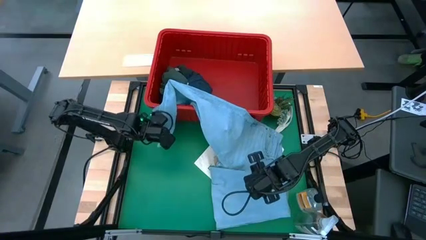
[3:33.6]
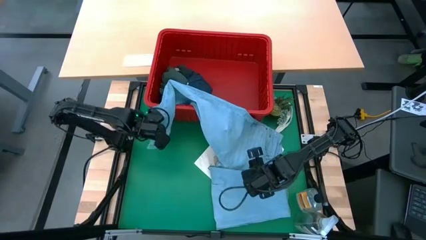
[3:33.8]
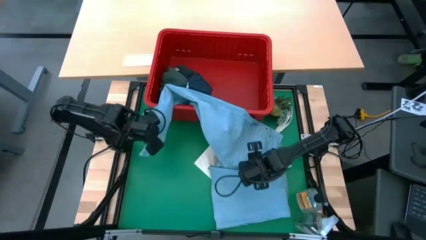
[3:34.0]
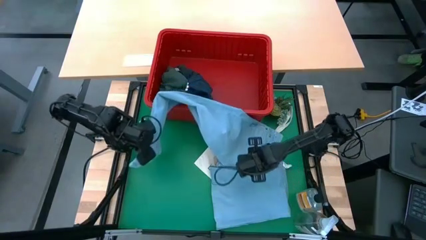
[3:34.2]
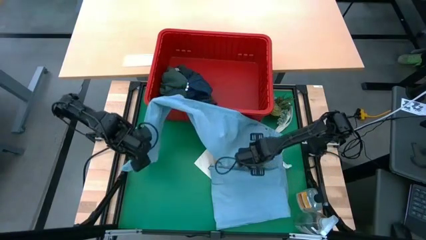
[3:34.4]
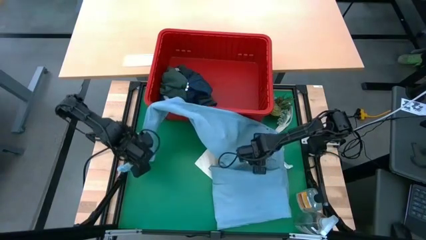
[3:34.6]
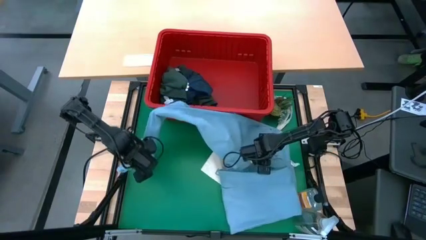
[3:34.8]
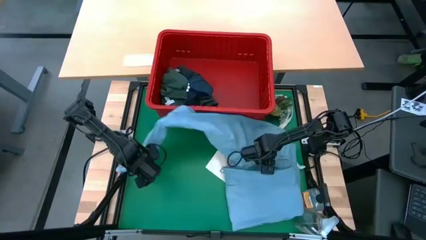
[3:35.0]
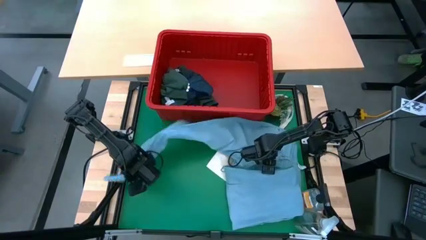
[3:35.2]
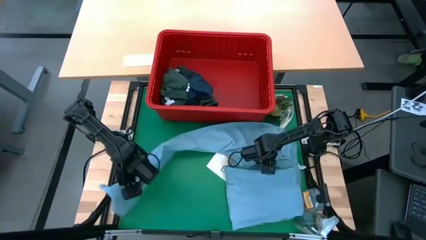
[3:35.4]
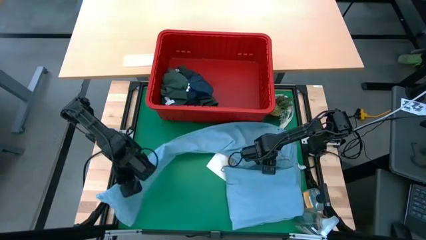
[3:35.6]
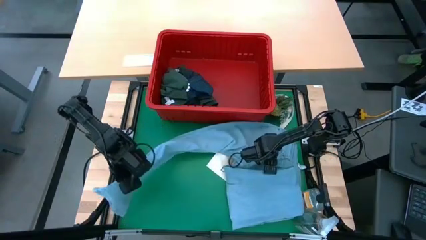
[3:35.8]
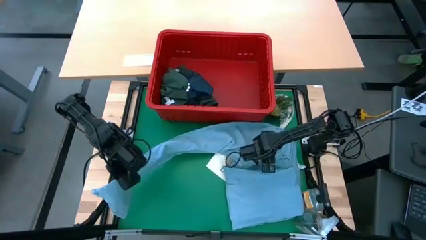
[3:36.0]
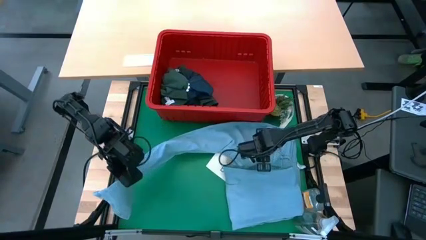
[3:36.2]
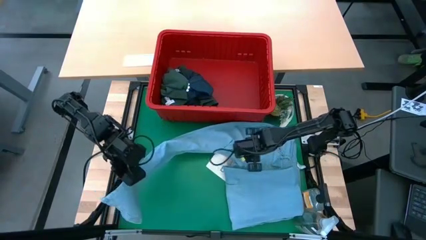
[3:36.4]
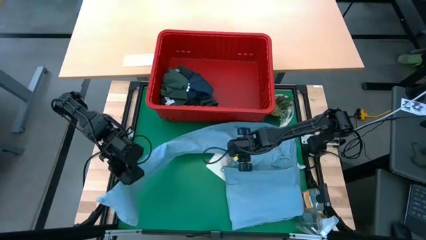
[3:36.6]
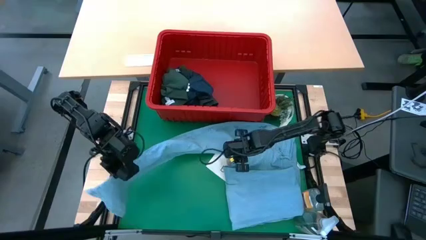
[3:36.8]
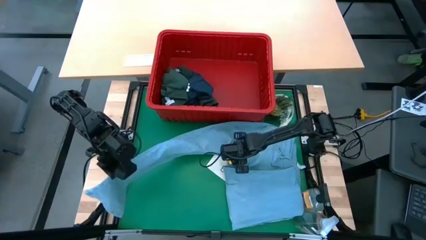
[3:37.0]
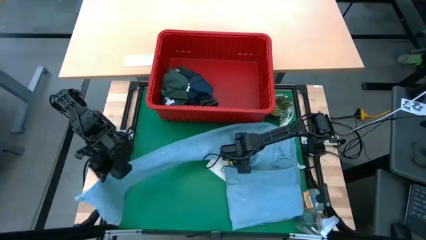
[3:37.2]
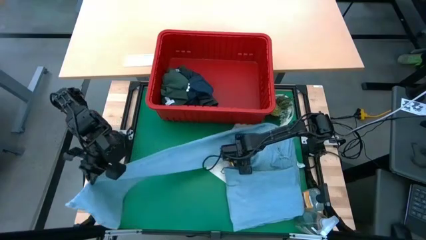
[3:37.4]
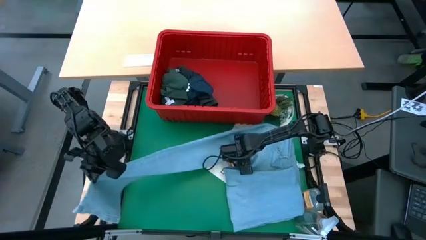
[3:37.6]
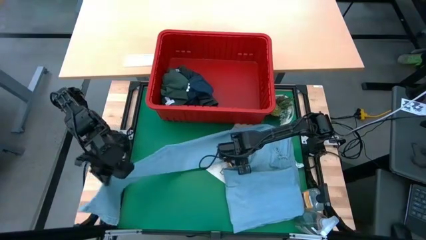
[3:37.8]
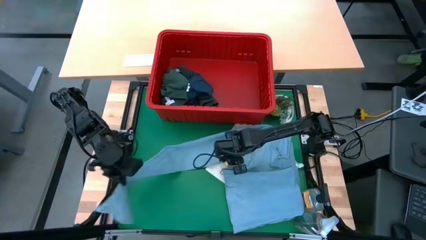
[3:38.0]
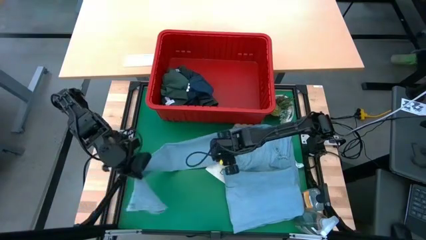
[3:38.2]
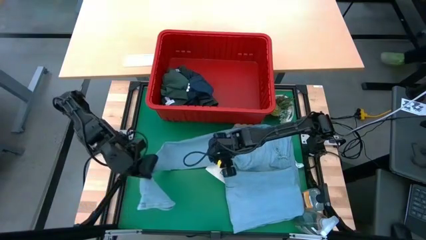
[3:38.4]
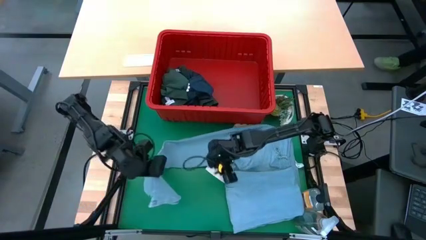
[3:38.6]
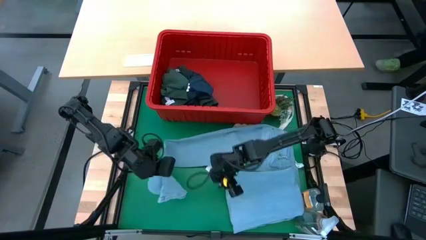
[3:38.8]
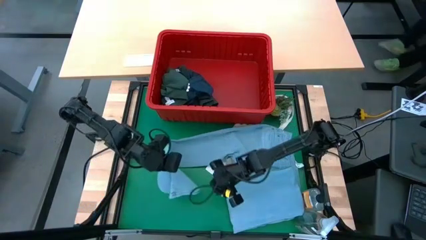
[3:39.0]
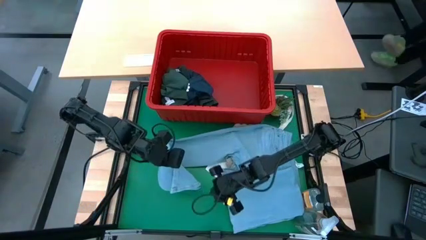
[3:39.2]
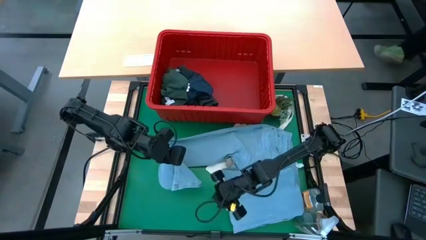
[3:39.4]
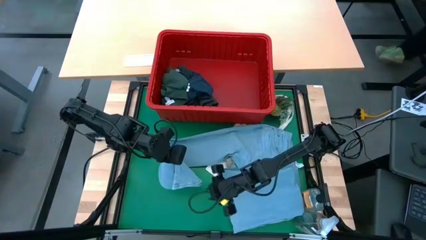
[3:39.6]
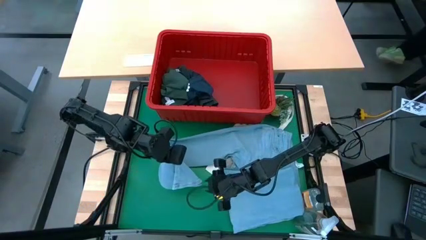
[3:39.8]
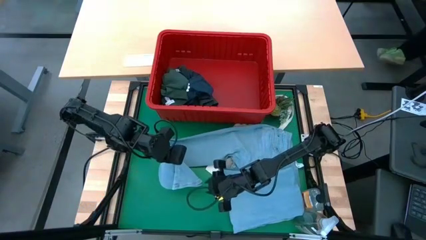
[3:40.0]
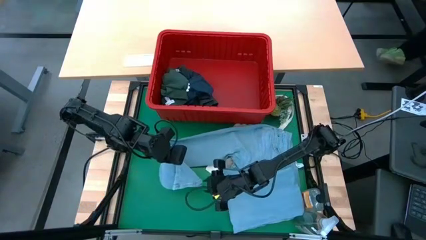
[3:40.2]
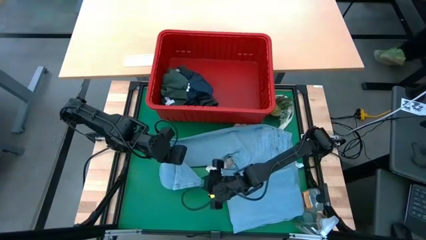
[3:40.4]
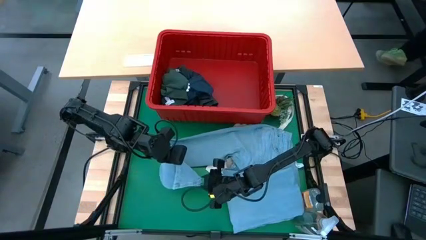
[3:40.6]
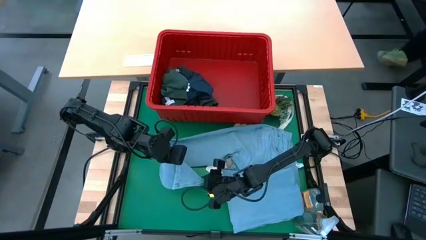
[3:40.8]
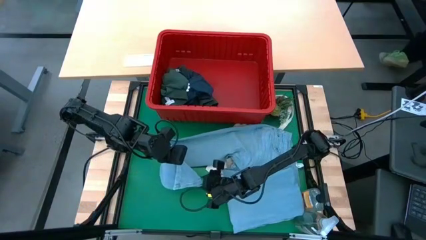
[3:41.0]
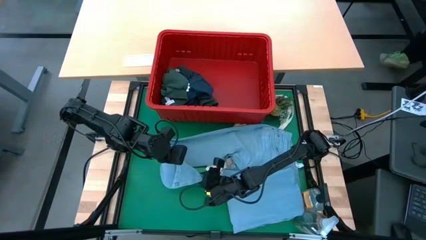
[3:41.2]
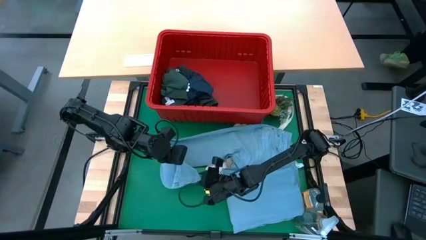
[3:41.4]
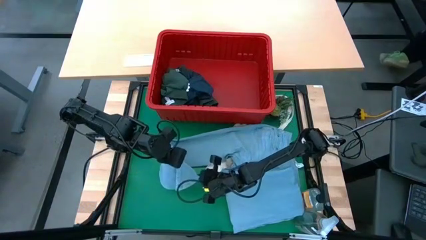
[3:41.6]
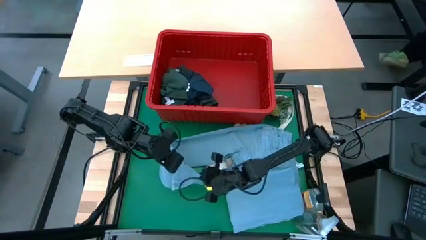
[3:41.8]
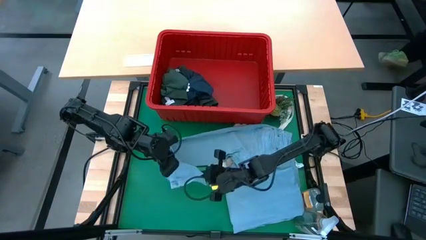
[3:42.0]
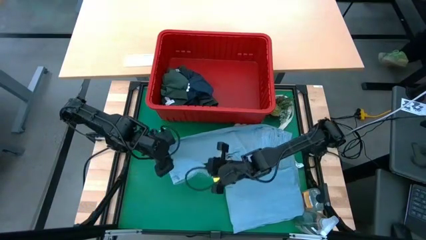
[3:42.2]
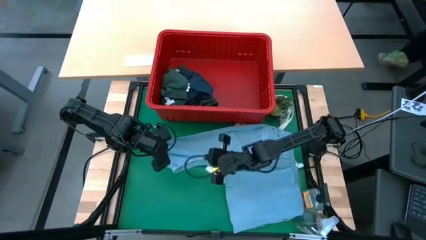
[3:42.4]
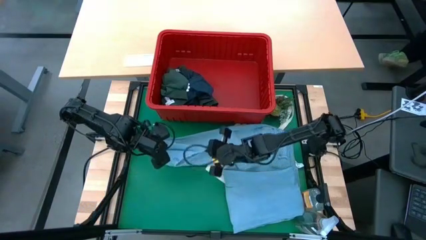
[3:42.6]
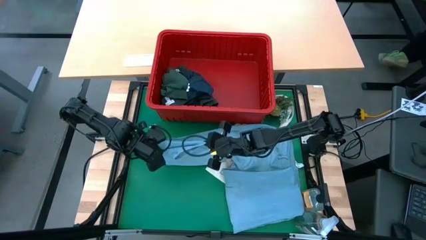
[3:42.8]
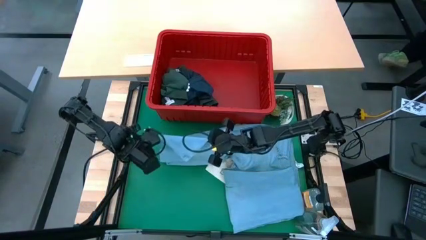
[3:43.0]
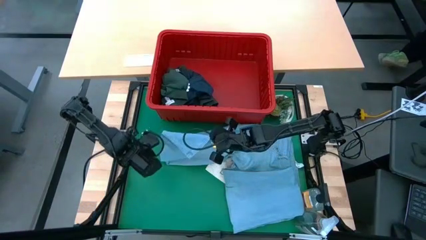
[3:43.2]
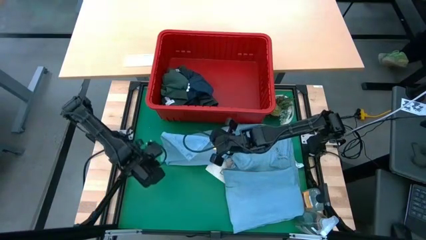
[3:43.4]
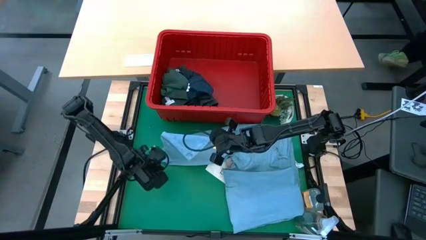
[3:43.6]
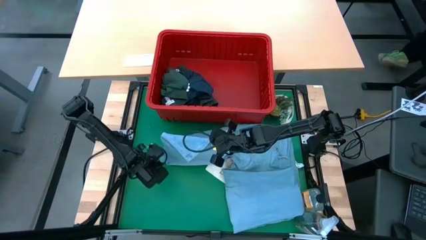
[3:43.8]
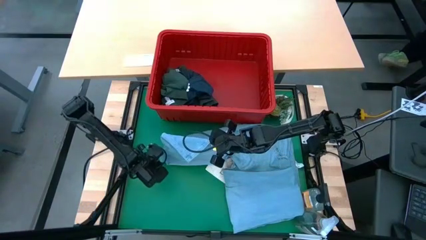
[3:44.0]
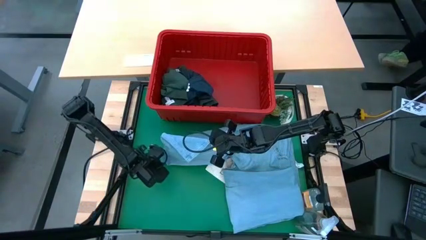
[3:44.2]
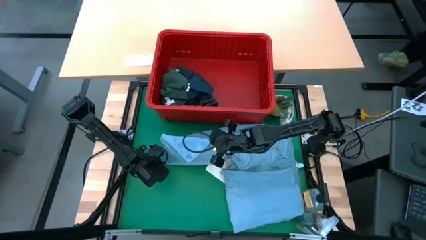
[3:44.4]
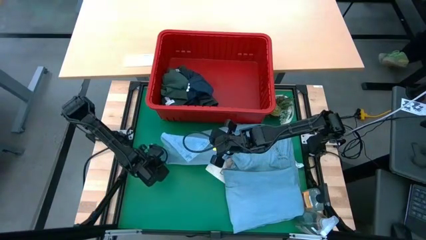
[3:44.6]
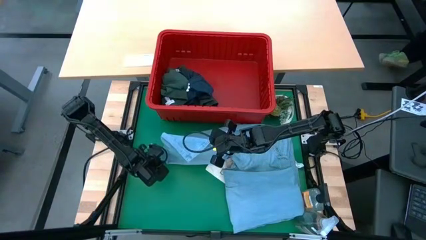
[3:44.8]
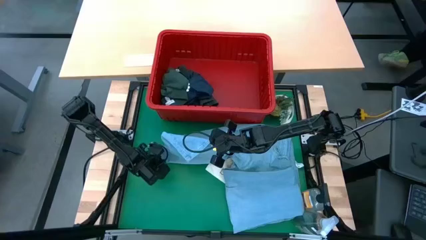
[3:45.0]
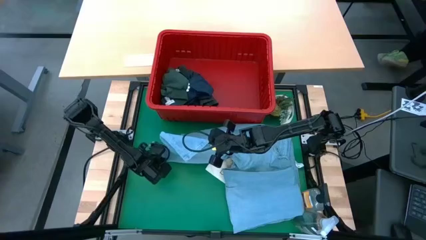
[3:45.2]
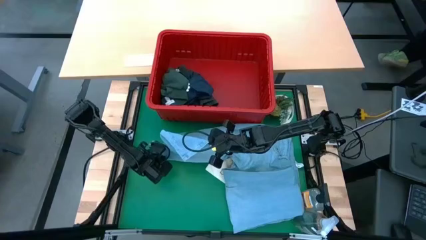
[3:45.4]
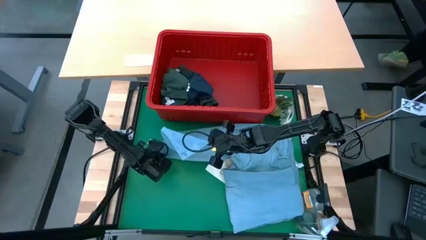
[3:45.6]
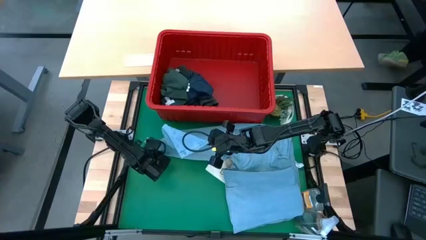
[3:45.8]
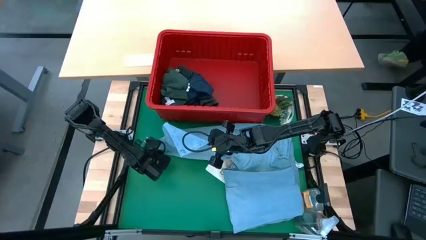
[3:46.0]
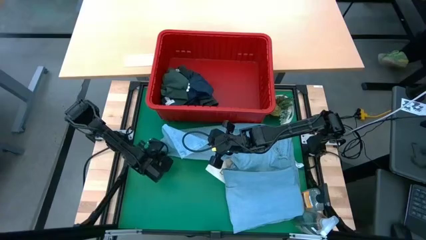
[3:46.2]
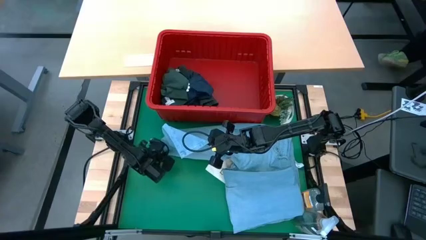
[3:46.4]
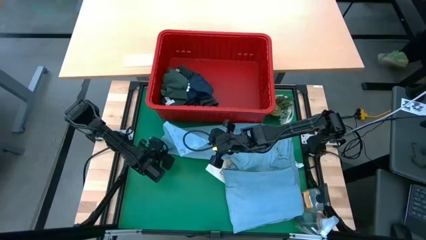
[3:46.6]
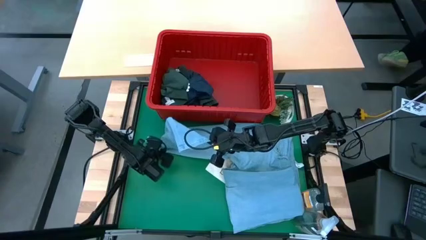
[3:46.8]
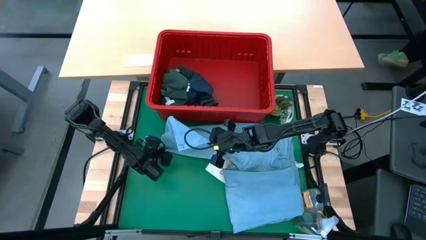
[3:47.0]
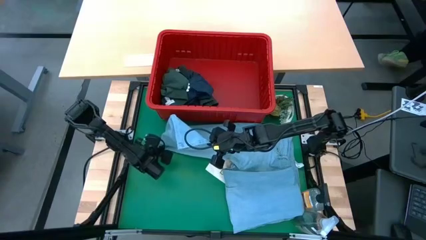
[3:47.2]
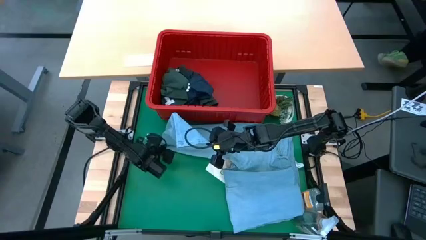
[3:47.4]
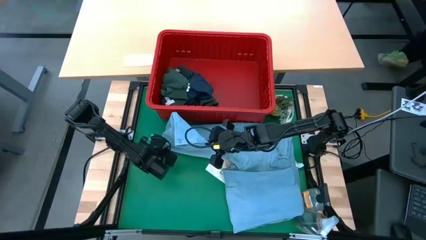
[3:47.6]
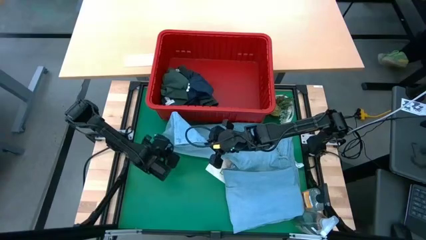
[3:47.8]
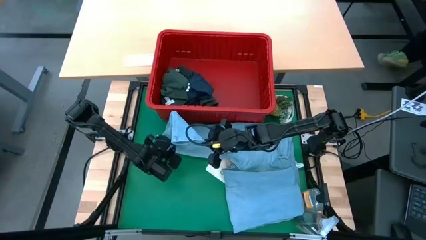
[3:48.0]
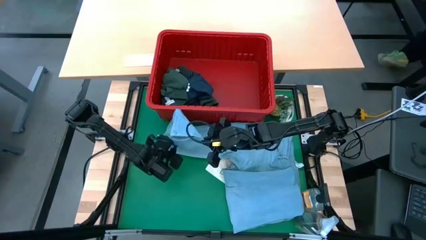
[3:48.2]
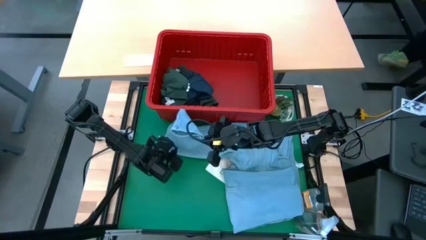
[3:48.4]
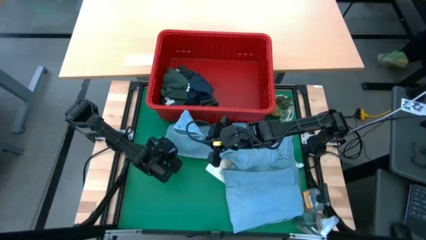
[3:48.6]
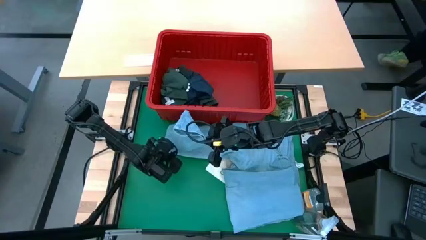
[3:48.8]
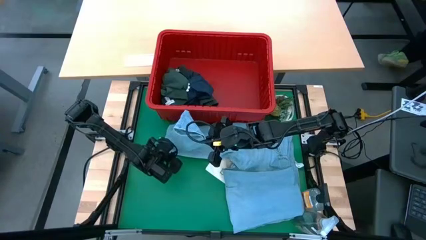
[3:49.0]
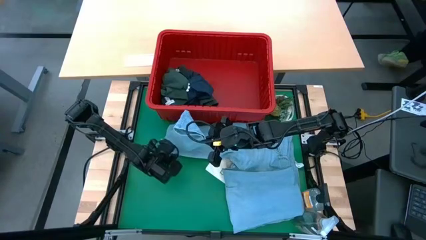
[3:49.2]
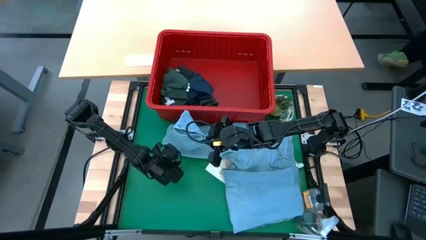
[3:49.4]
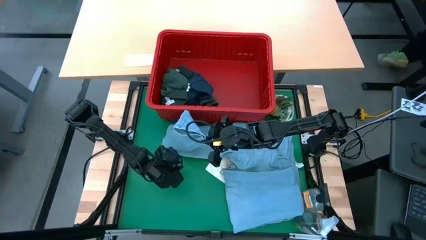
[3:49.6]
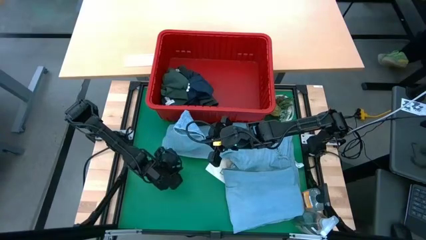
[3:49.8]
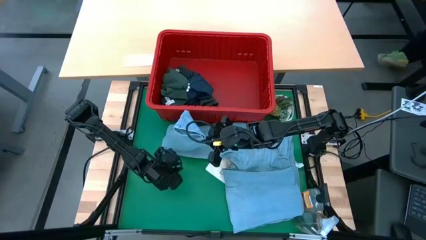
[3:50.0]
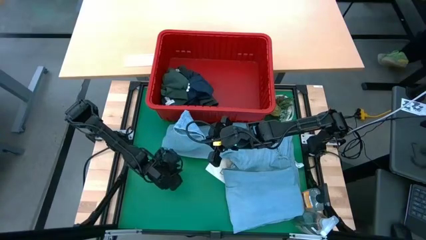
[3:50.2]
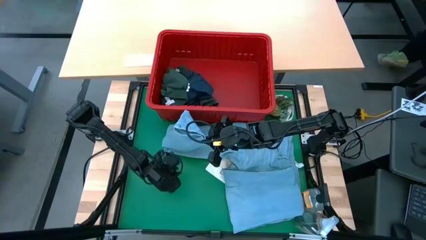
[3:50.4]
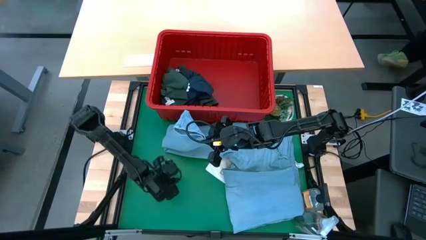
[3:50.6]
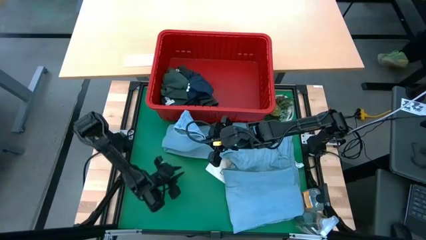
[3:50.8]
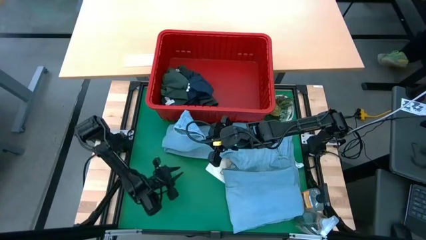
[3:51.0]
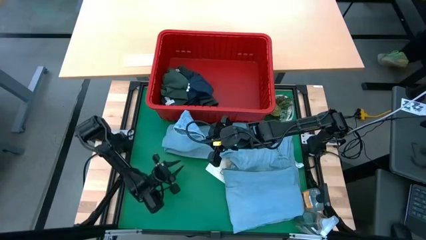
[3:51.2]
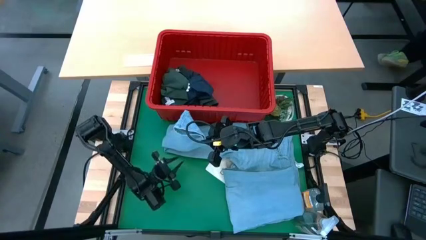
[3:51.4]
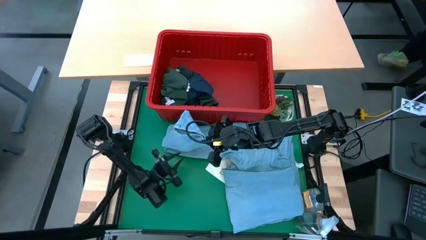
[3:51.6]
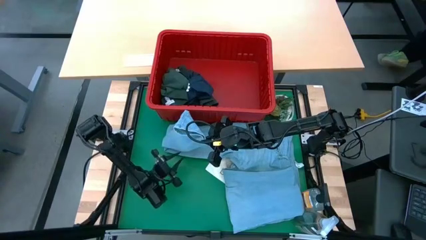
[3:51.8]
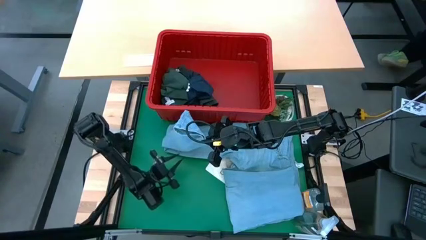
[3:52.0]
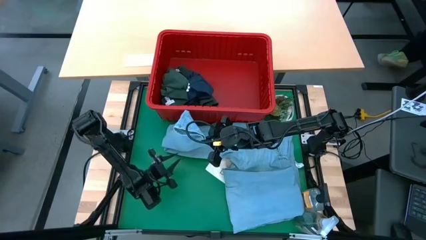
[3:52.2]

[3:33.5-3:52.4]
Task: Fold Laundry from Bin
Fold the light blue jeans
